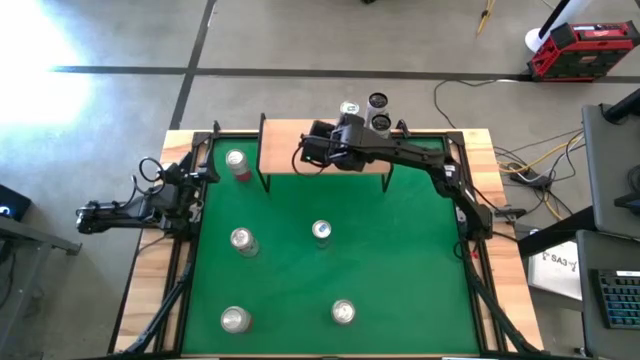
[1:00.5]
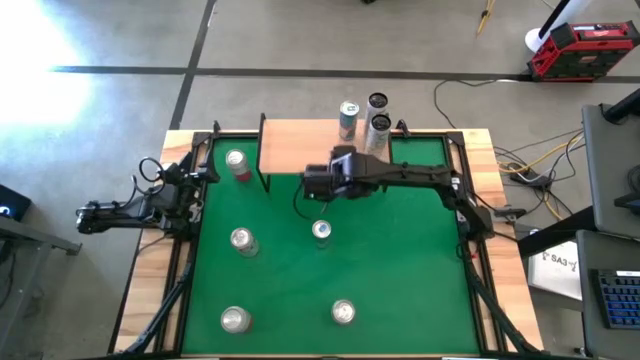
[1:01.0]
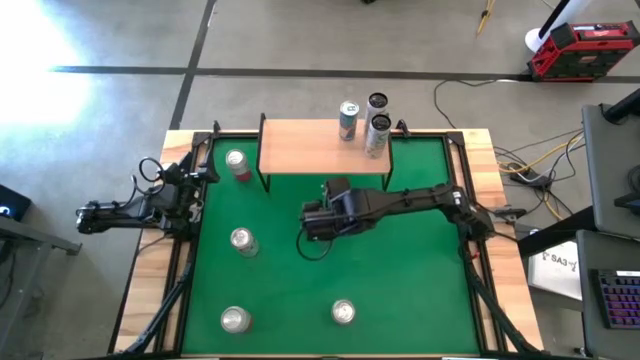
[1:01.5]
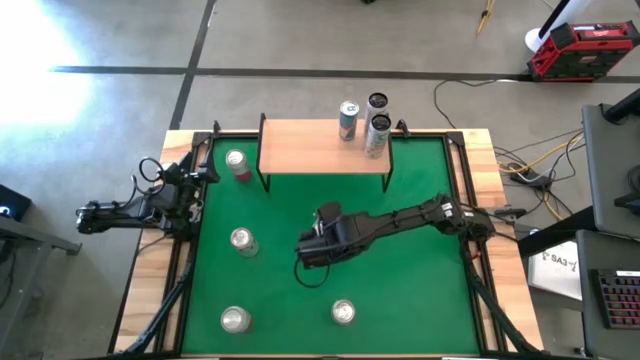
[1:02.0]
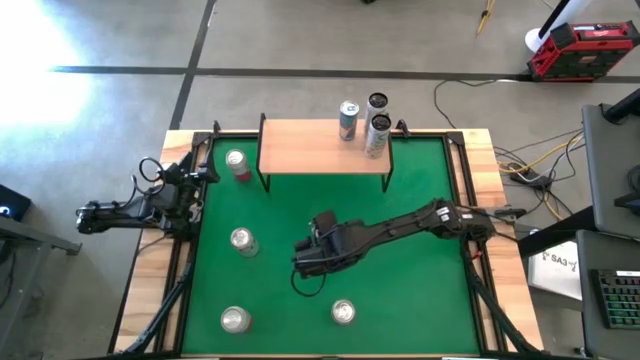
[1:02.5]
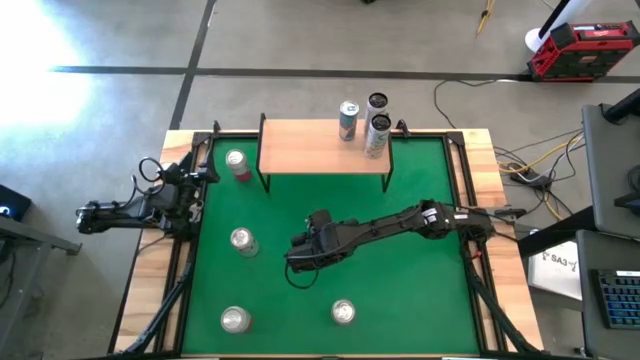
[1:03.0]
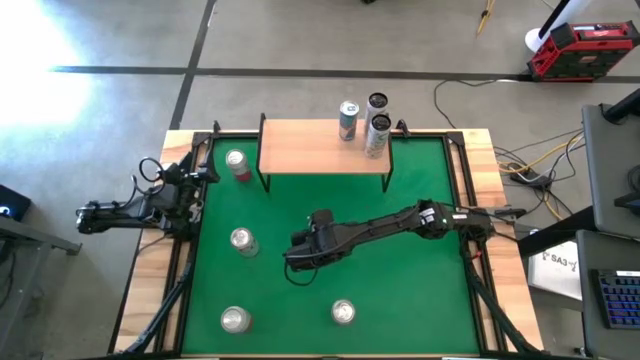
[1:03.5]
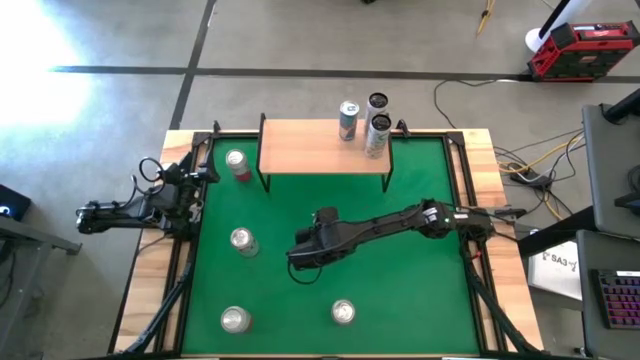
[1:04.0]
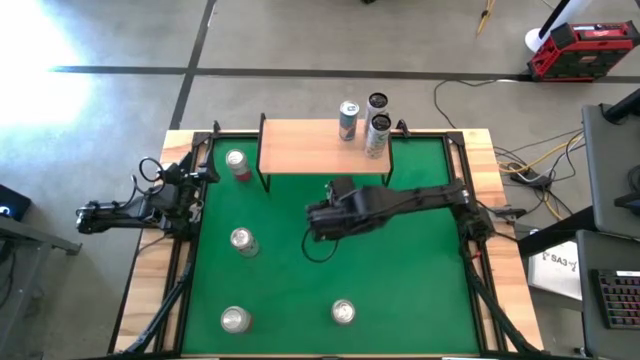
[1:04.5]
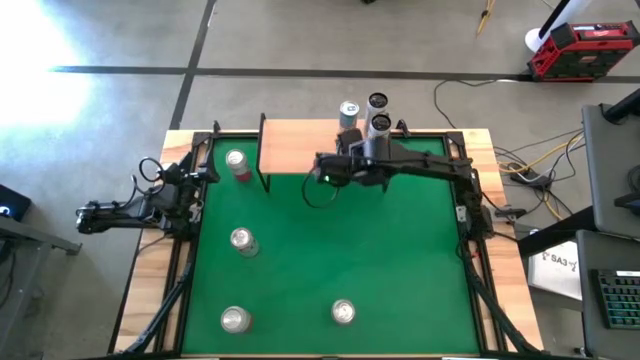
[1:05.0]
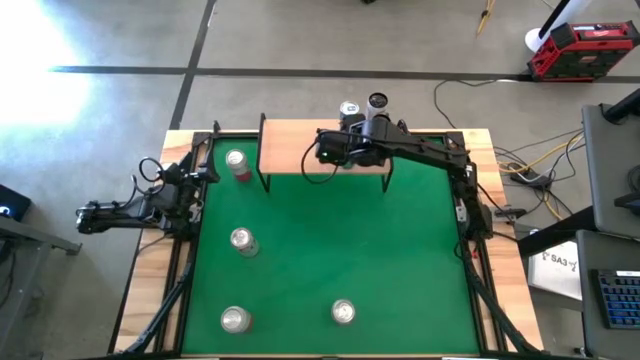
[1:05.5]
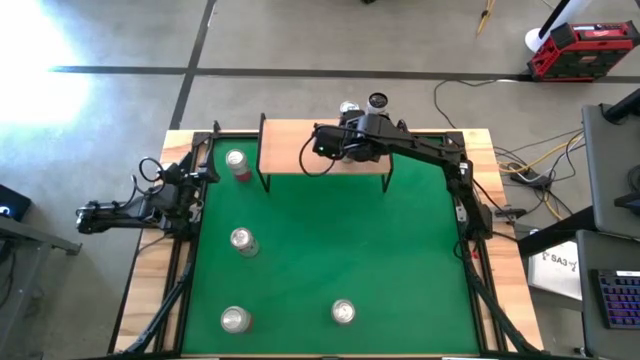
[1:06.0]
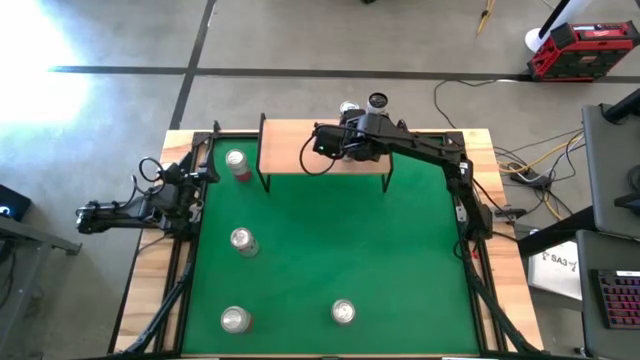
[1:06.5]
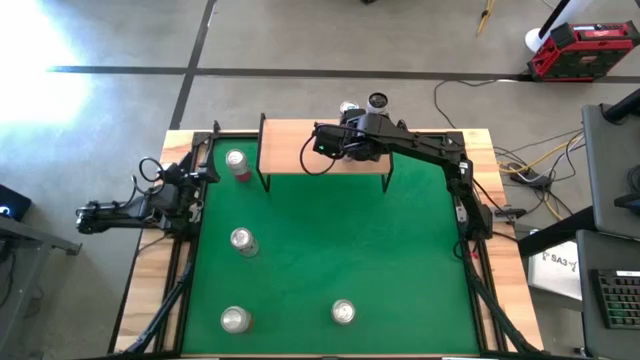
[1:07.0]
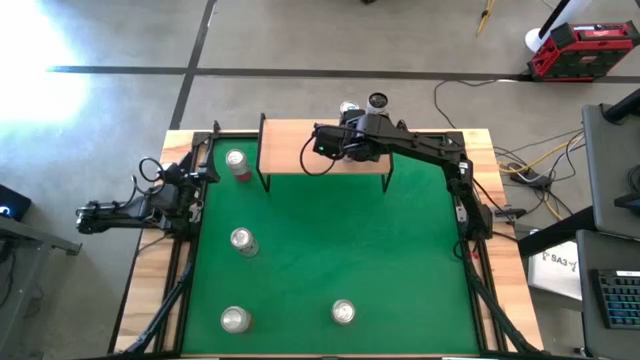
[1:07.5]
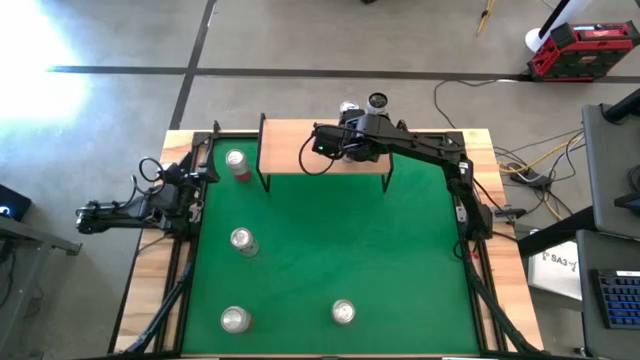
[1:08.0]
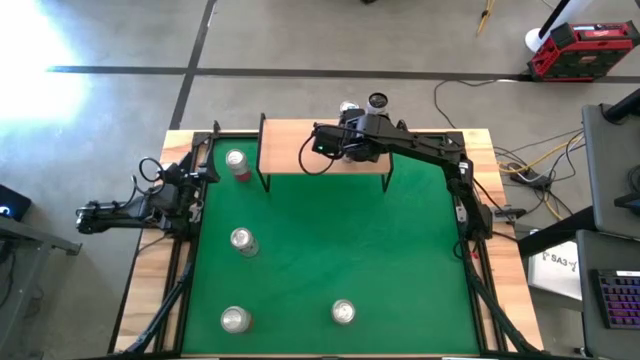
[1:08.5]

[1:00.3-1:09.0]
Task: Place canned beverage on shelf
Put the blue soda can on the shelf aligned with other blue soda can

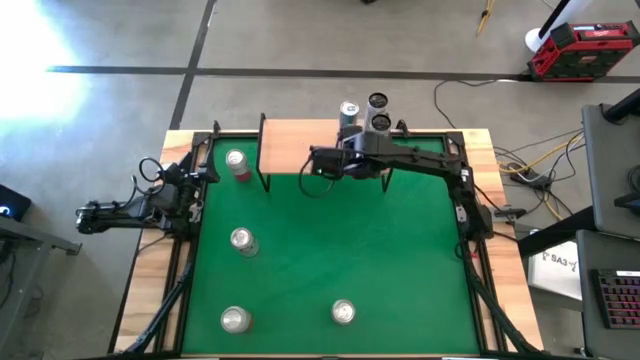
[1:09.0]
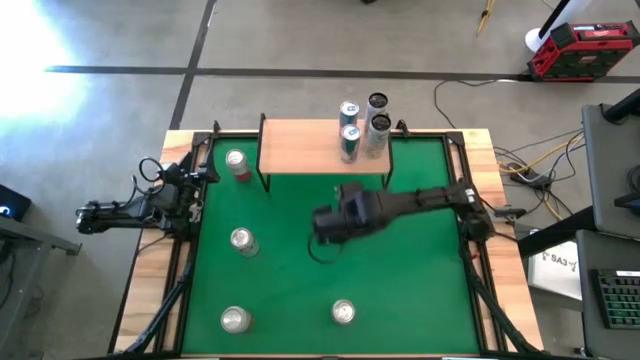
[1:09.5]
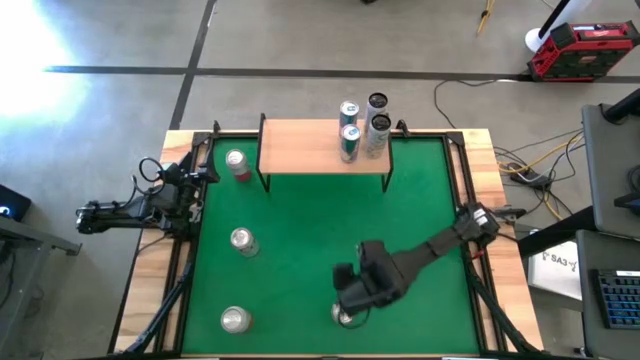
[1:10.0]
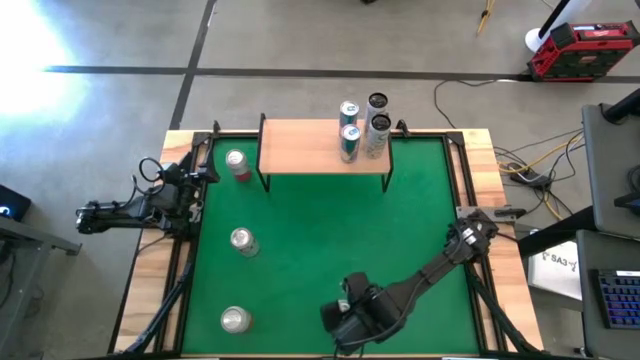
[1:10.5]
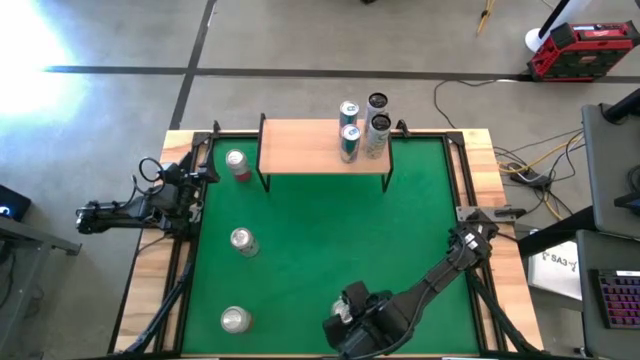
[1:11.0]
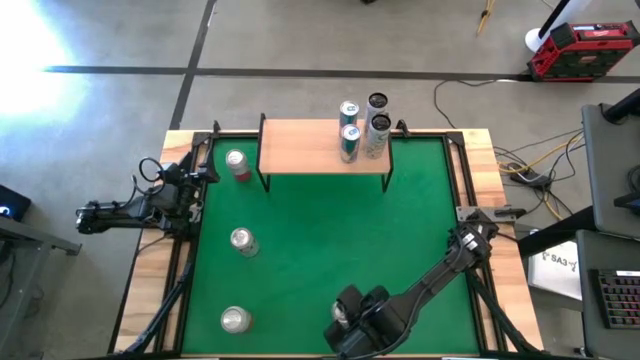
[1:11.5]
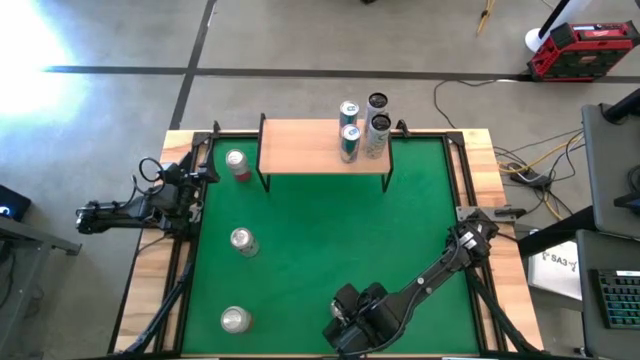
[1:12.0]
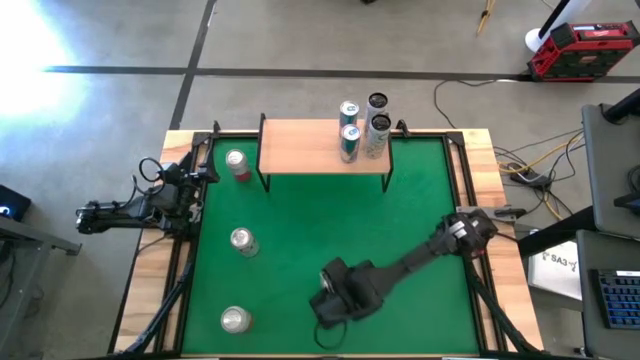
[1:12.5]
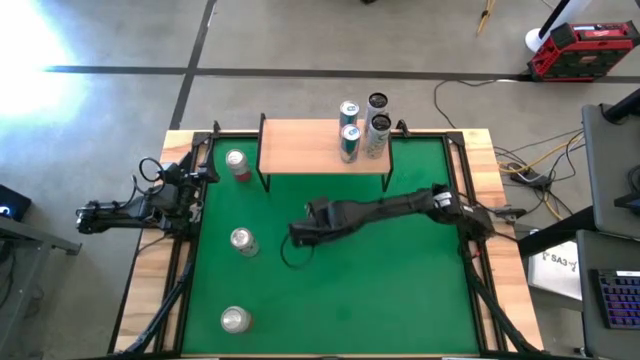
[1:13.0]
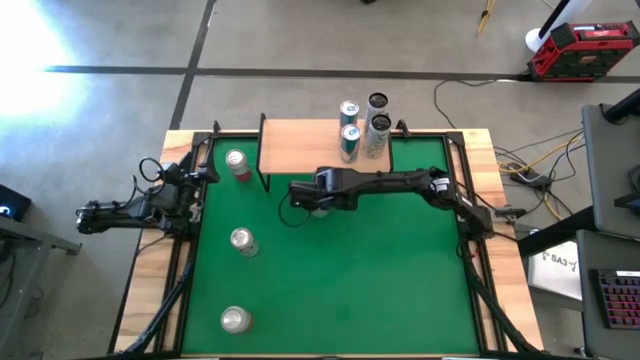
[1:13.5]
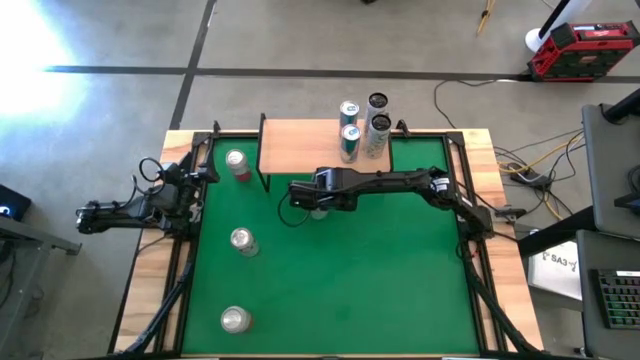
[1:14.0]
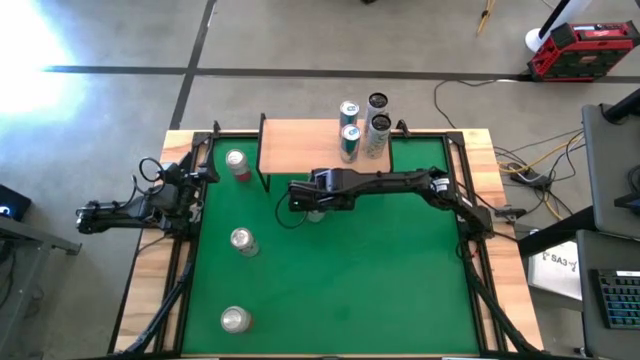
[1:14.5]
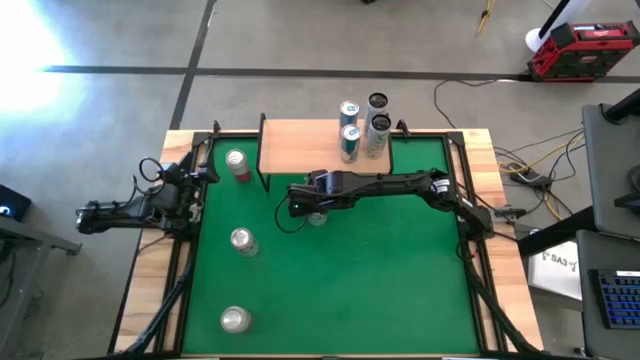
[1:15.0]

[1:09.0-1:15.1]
Move the bottom red-silver soda can to the center of the table

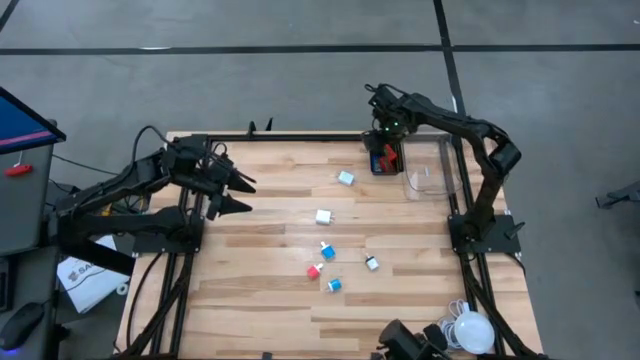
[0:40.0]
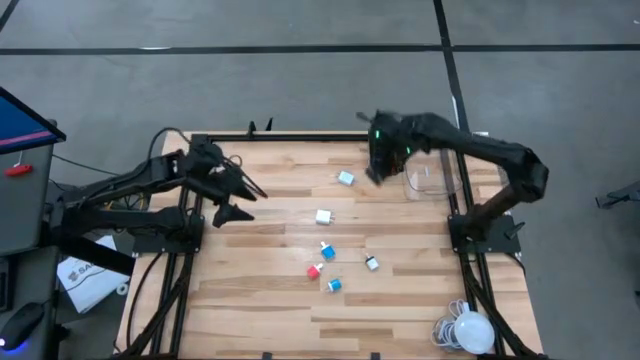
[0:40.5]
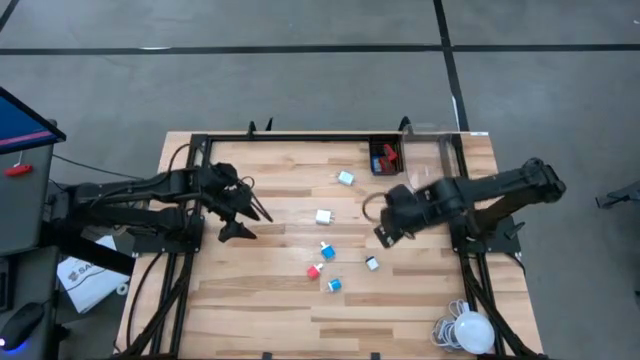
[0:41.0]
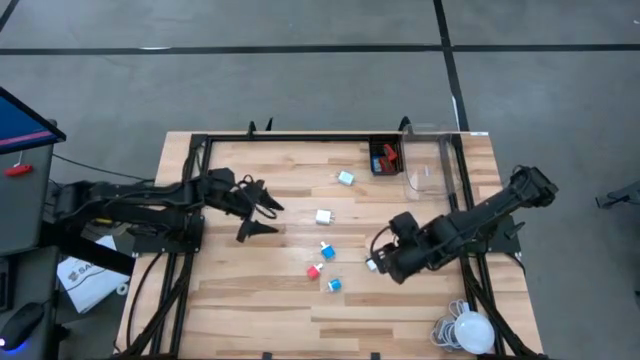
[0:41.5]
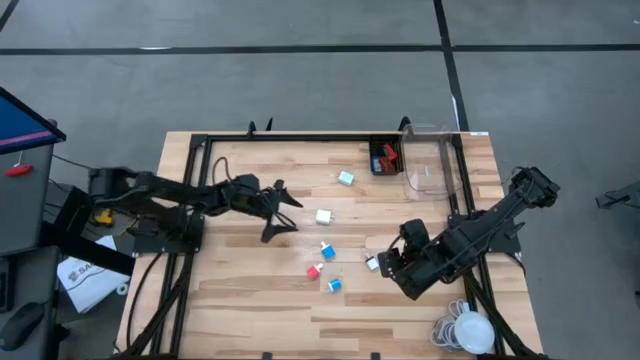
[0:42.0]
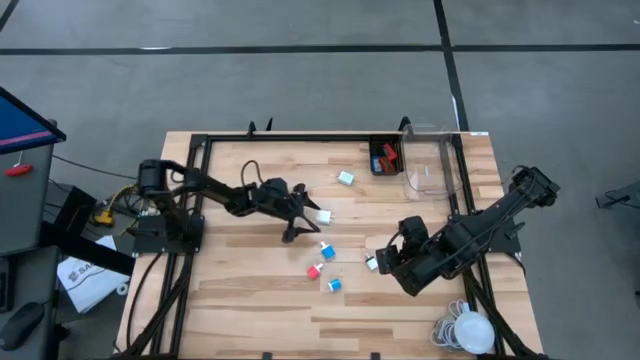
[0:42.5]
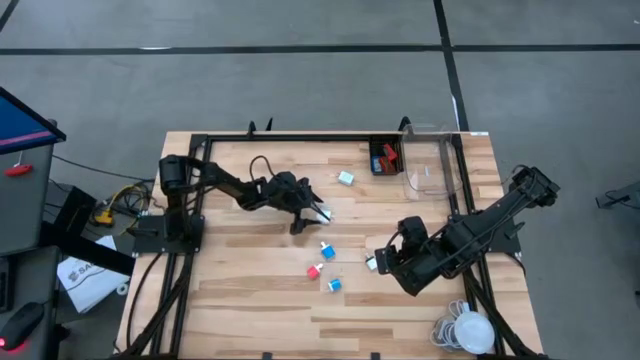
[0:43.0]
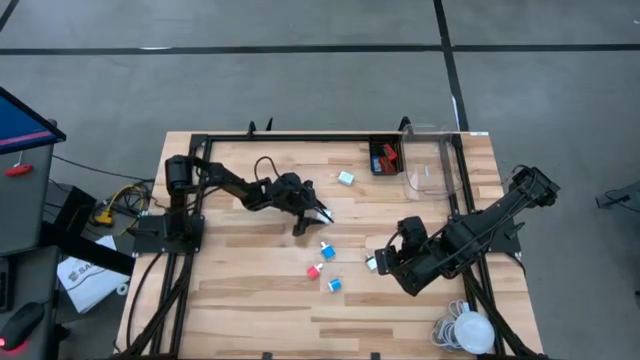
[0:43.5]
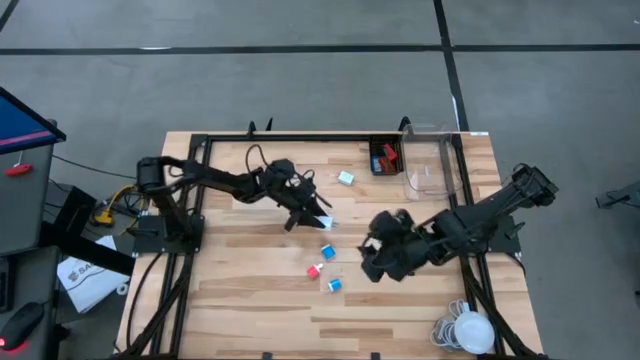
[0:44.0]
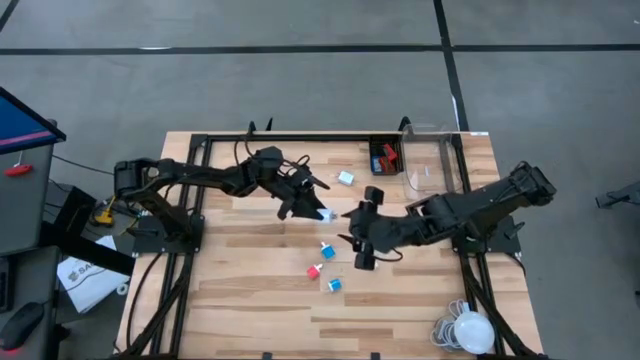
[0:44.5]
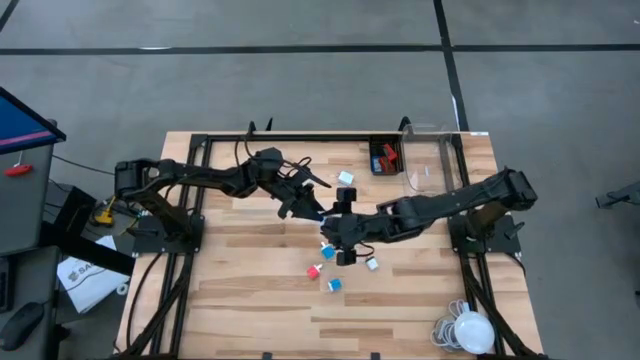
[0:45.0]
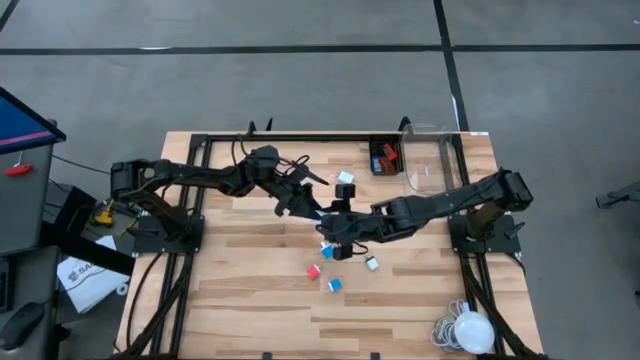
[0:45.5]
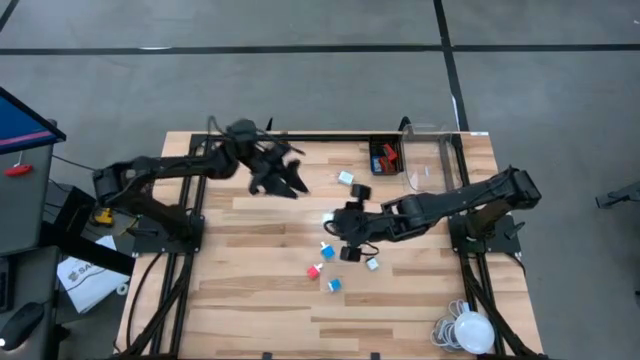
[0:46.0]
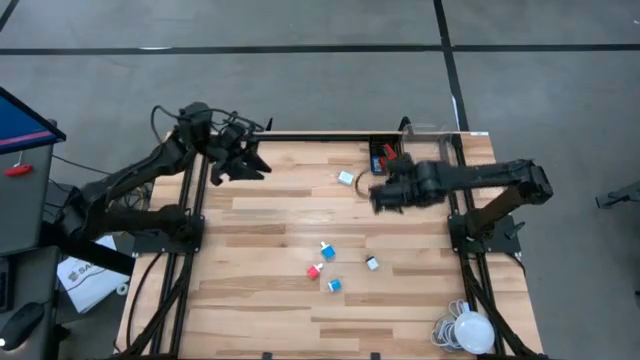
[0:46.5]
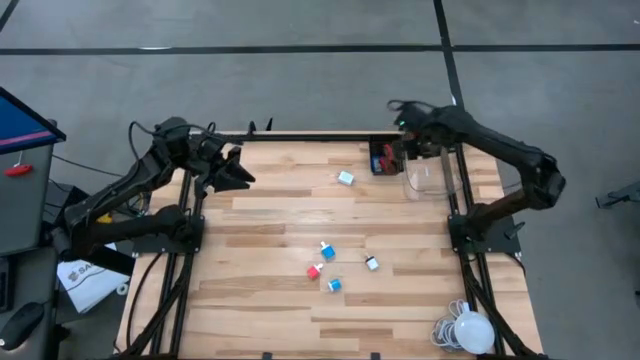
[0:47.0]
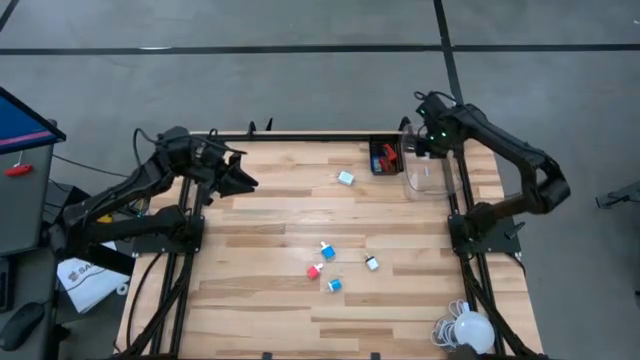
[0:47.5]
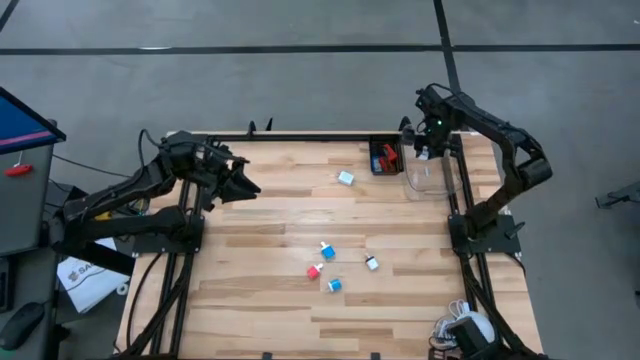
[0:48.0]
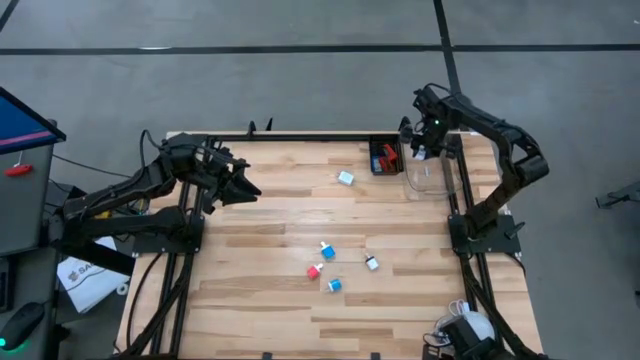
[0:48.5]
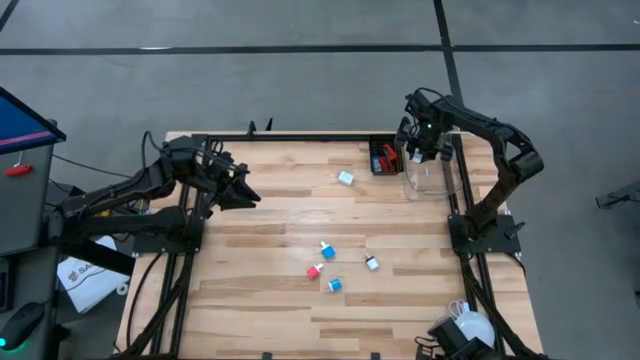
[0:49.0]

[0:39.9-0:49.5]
Task: Pick & Place Office items
Put the bottom white charger adapter into the transparent bin
